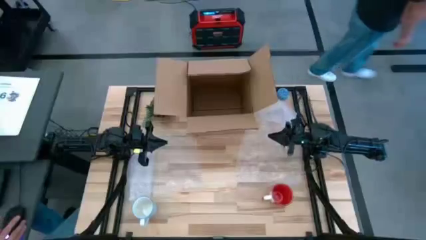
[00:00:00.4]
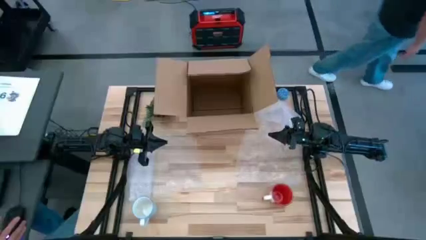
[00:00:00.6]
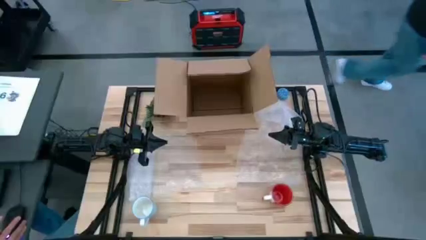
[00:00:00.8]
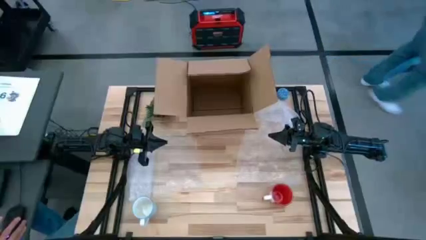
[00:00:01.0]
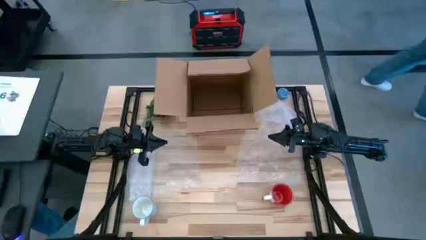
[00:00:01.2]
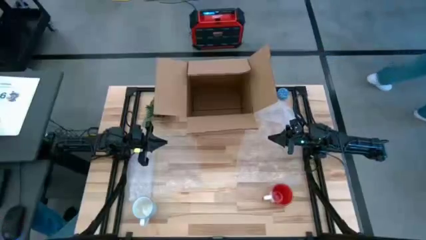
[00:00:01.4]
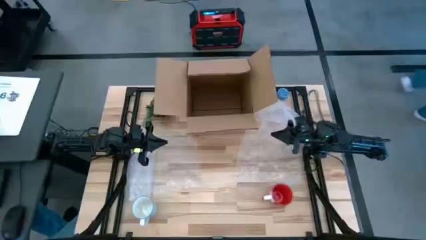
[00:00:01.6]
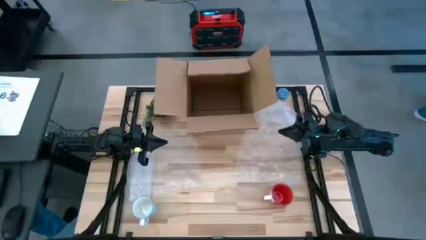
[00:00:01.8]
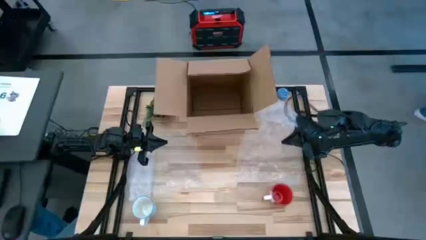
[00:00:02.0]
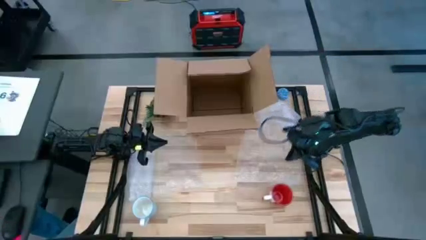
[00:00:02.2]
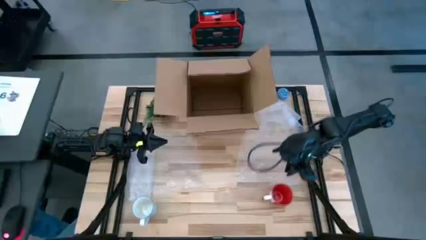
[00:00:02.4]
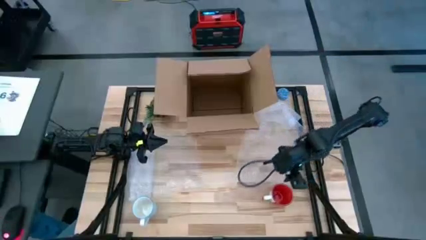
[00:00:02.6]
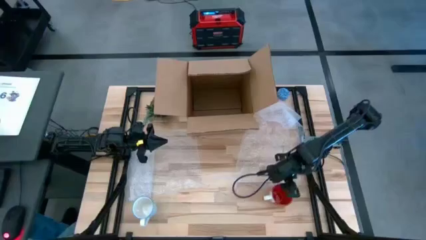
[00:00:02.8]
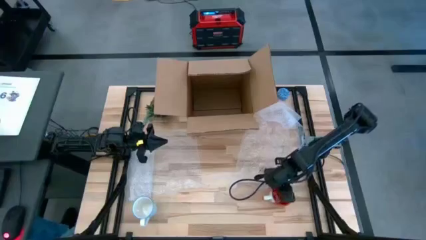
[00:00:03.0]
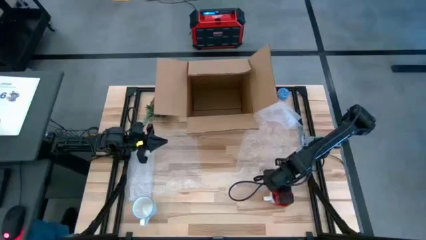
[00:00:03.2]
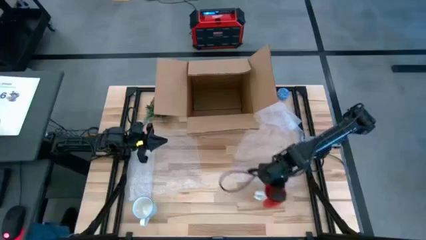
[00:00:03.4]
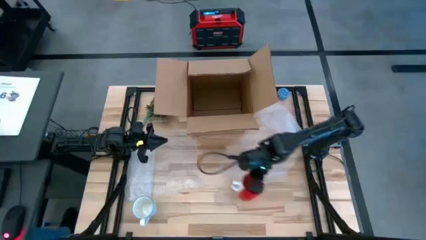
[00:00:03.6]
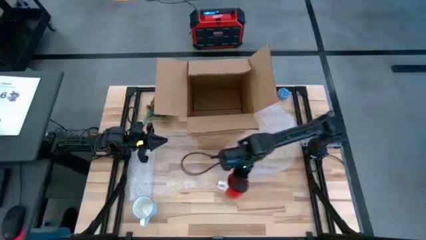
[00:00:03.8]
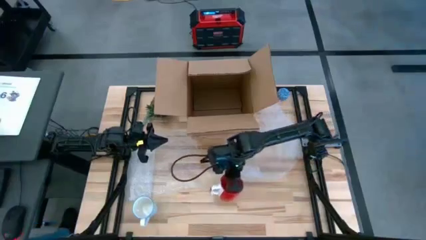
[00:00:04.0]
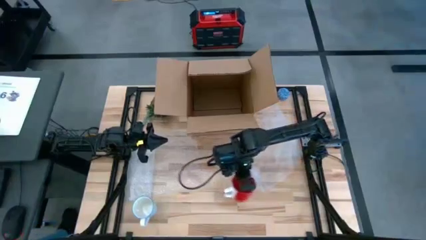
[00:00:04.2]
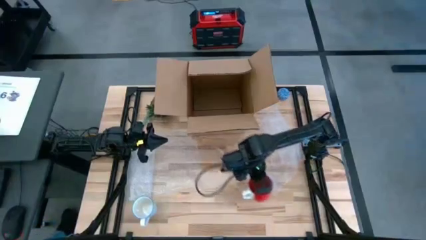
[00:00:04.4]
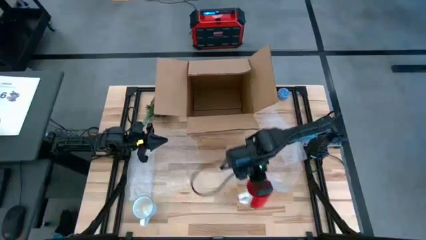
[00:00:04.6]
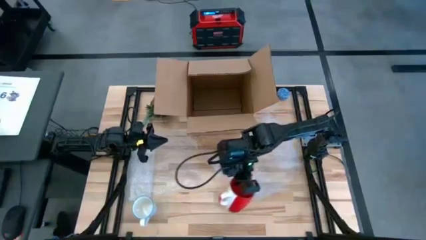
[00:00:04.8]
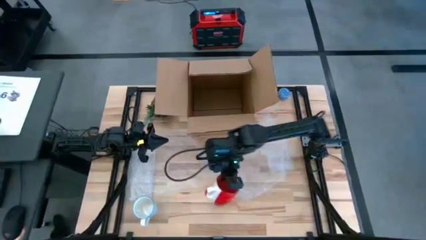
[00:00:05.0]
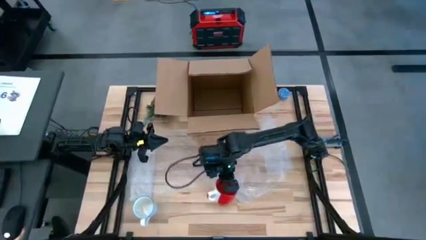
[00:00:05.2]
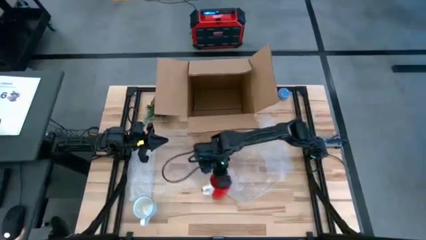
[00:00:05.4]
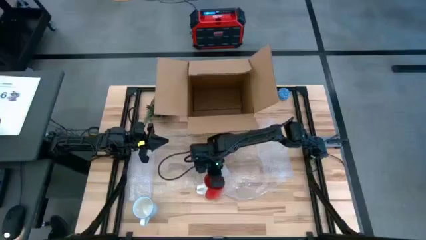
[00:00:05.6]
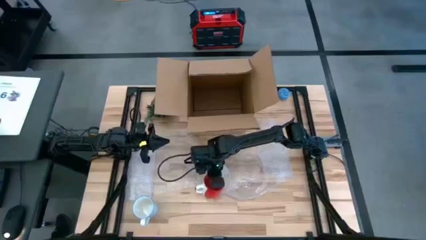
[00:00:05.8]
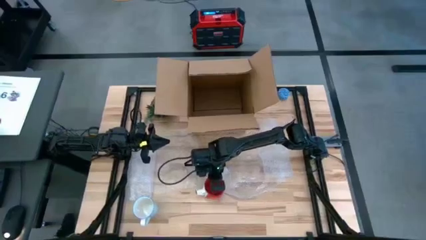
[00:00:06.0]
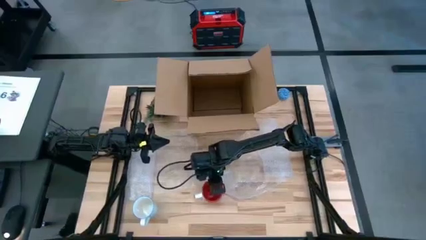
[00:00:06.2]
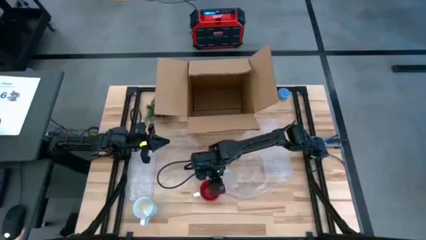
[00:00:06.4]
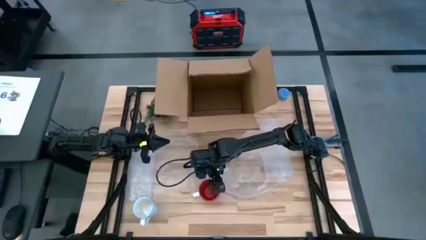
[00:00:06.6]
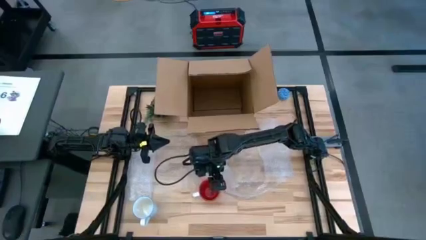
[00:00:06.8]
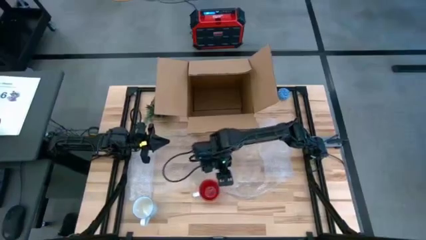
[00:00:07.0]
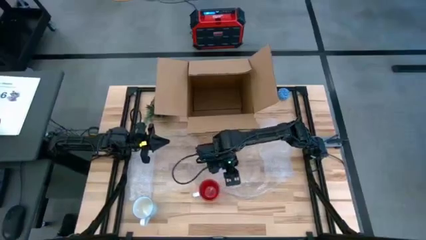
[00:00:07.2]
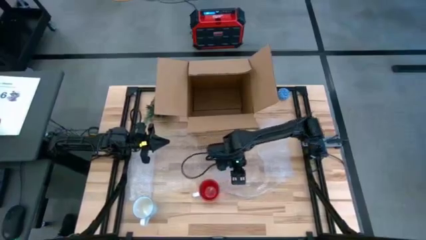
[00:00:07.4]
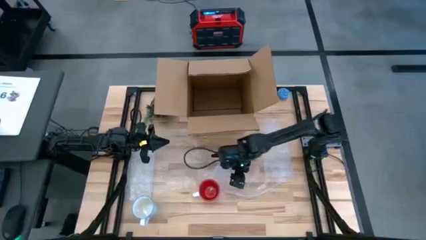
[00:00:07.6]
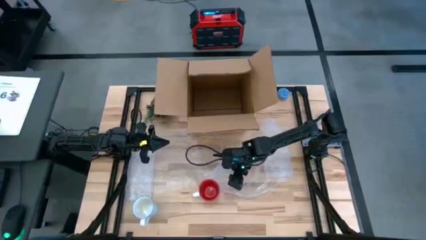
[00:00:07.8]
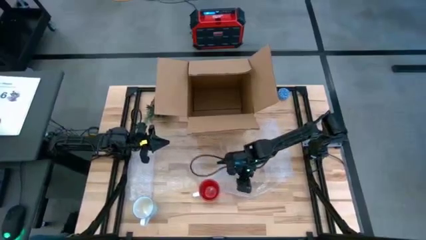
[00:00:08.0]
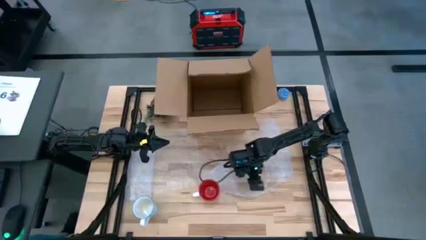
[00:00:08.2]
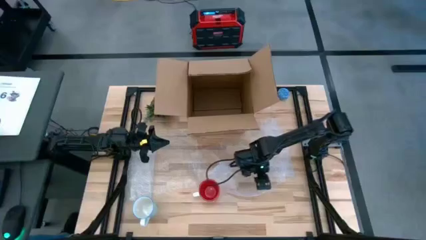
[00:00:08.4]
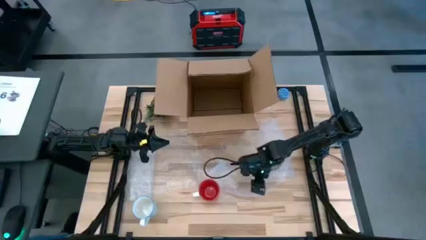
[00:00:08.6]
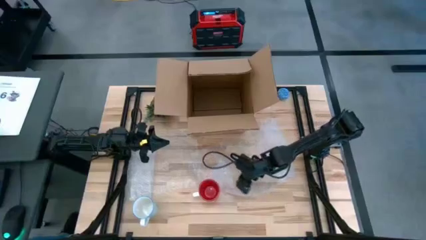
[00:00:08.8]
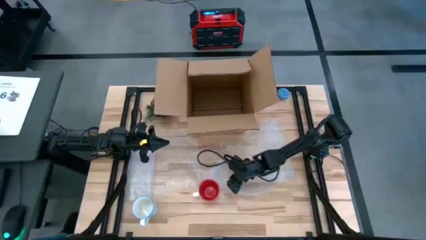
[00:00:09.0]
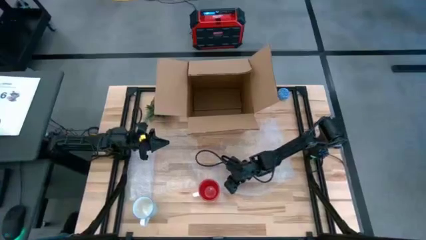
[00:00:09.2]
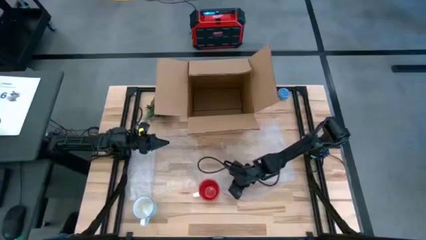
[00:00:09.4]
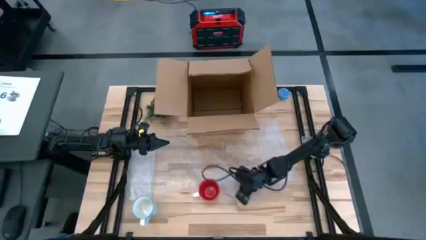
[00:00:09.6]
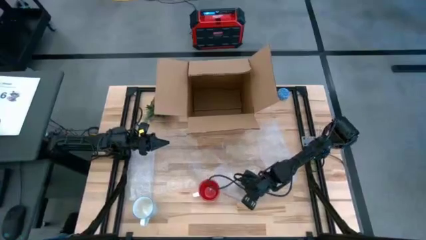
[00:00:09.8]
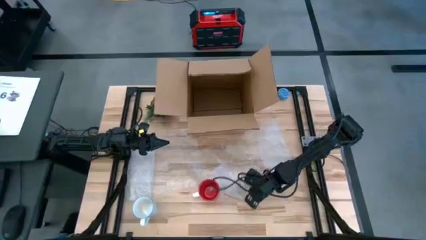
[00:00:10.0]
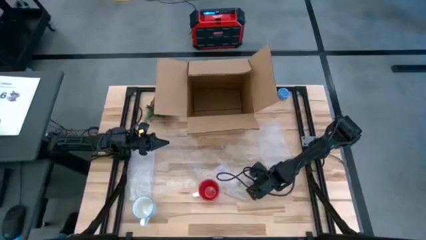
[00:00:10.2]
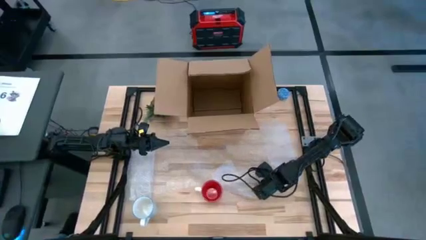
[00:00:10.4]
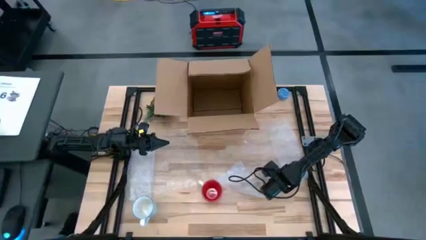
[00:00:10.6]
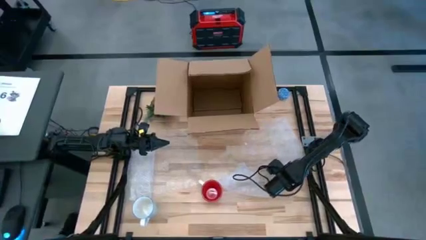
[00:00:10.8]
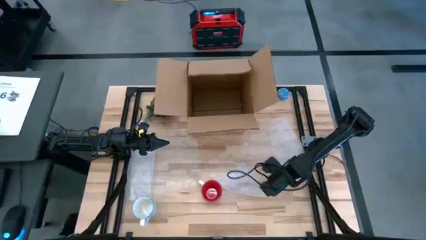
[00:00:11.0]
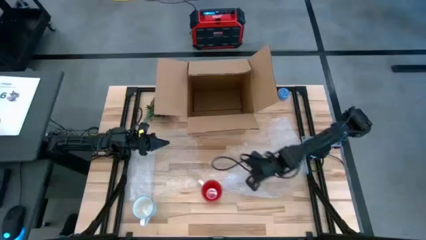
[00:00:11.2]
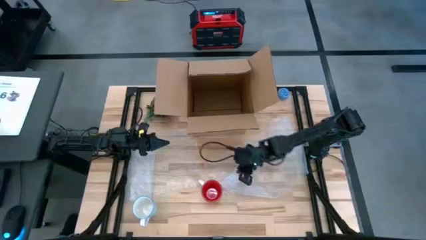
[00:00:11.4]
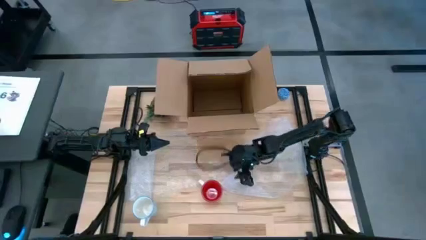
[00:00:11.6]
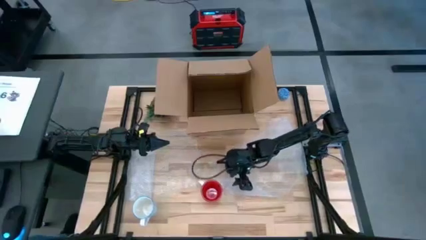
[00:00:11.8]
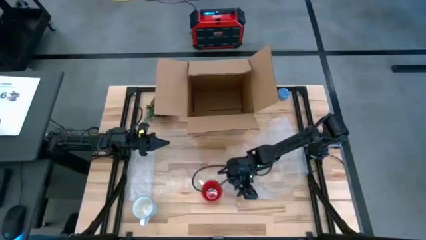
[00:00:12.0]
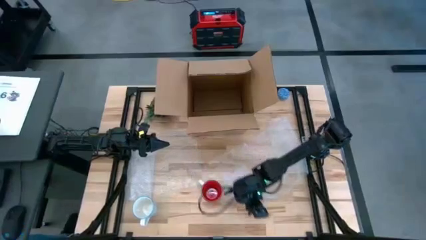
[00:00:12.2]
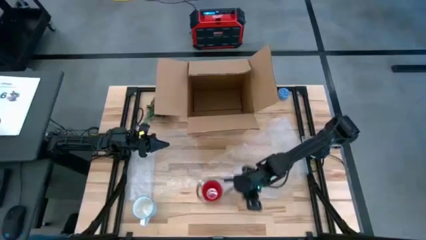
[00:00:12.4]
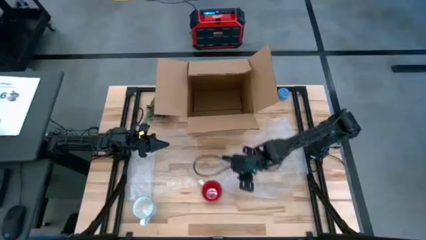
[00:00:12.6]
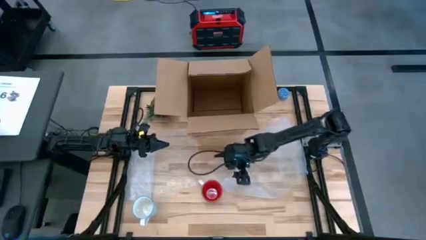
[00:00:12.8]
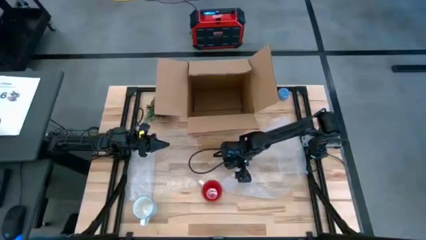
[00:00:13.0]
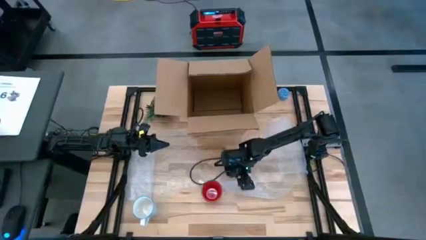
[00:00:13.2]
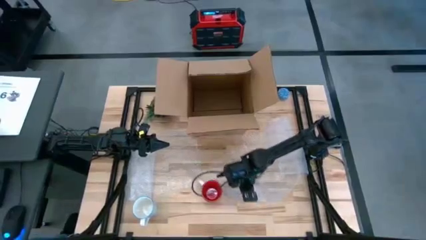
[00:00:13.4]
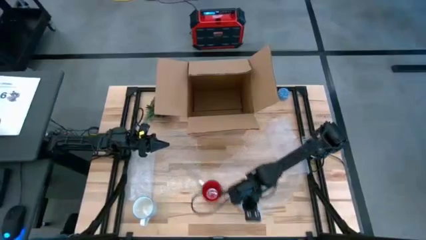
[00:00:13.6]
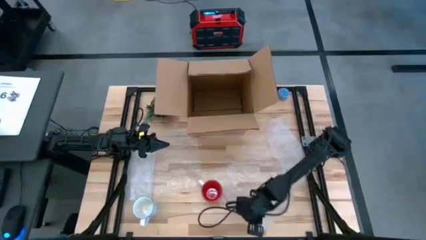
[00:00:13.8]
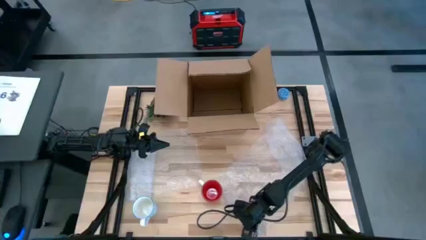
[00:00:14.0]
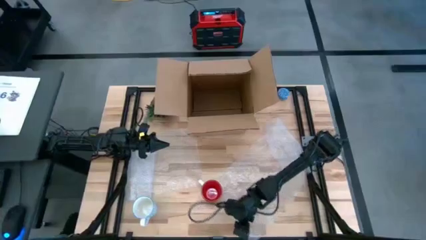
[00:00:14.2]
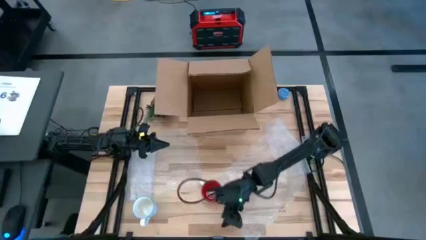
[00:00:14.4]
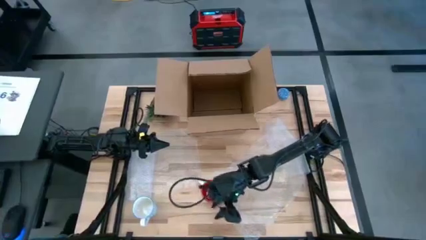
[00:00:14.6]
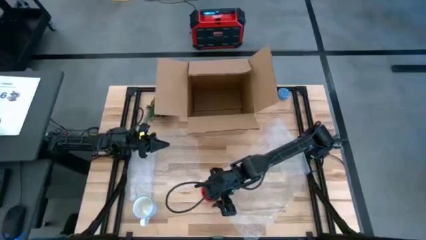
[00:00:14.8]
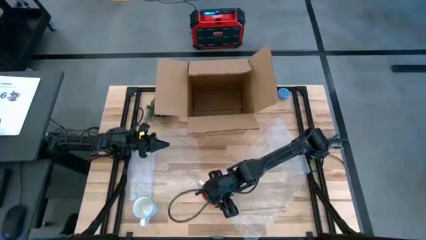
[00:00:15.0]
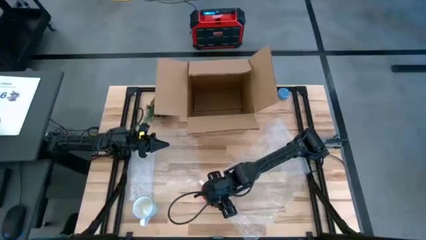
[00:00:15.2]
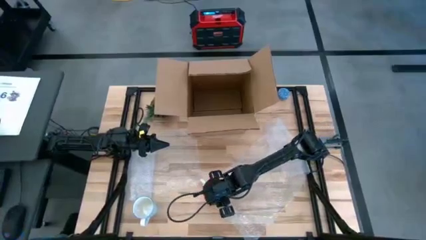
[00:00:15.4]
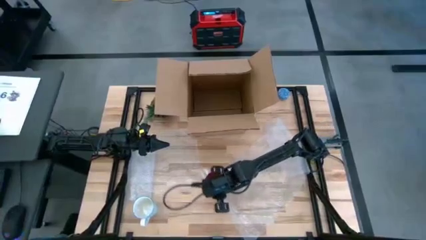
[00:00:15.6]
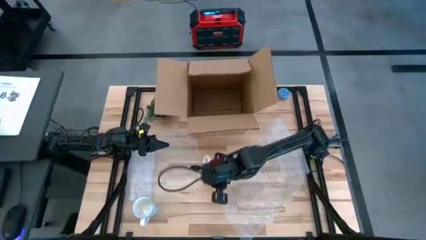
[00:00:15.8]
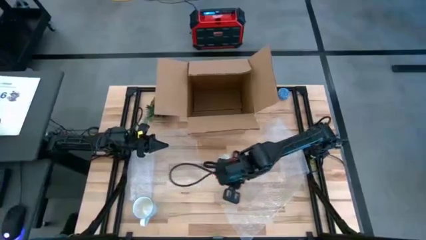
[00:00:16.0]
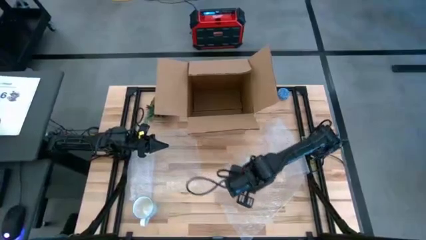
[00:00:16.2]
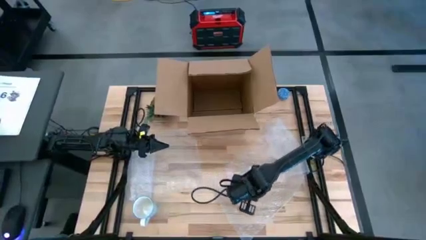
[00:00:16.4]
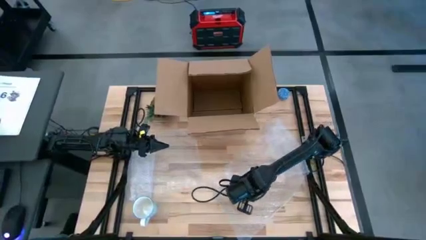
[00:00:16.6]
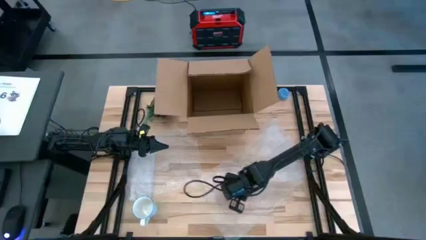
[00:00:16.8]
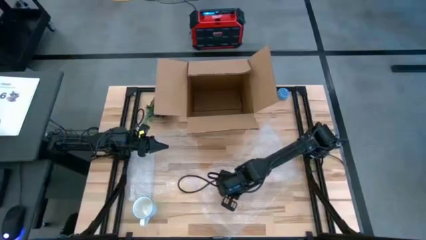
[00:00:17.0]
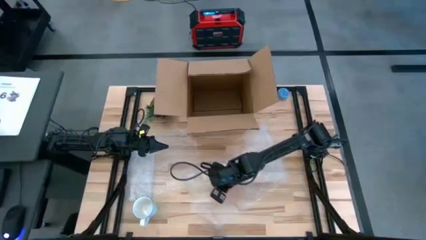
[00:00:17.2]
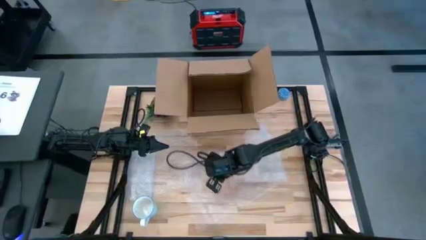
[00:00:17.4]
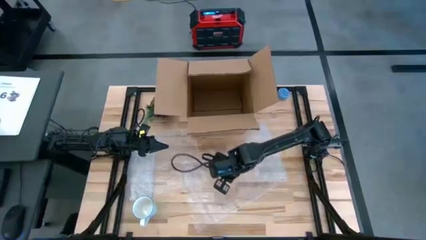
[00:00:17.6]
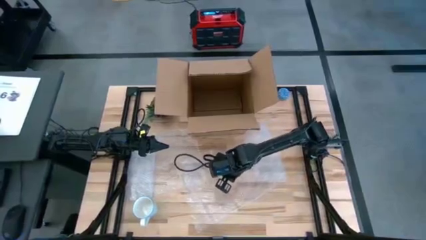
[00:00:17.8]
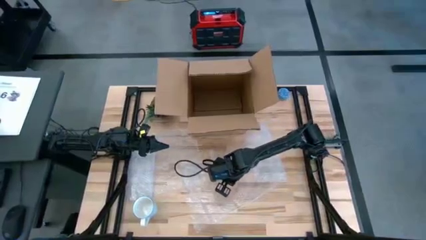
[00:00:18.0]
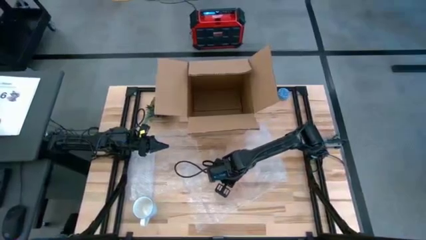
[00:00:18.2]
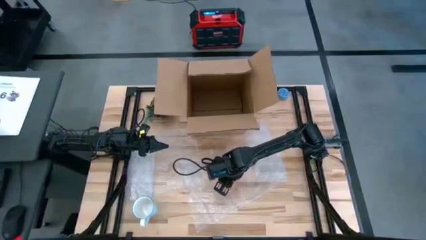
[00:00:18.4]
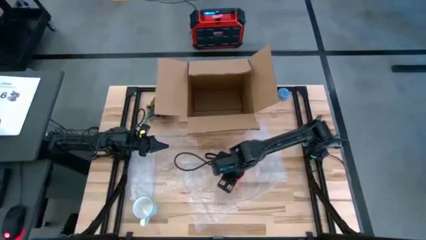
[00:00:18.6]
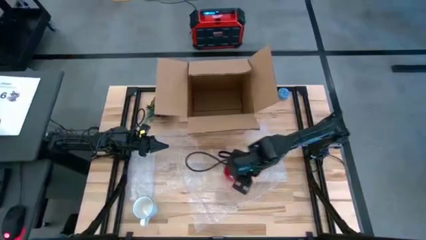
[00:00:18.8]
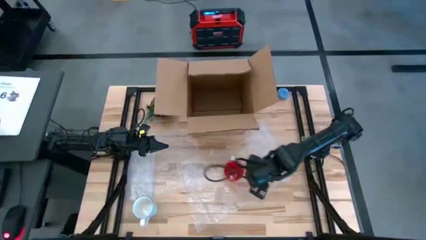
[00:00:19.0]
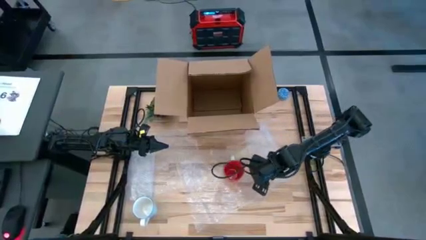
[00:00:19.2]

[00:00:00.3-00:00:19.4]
Task: wrap mug
Wrap the red mug with bubble wrap
